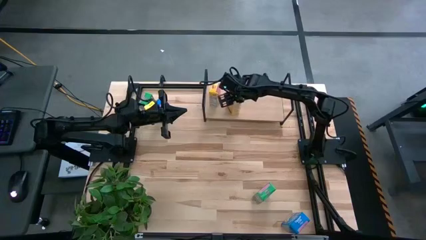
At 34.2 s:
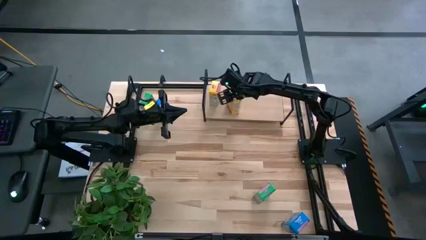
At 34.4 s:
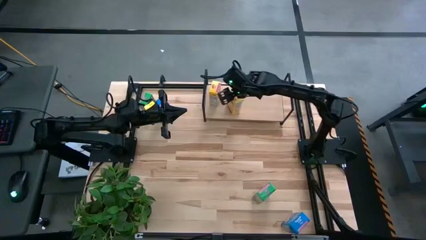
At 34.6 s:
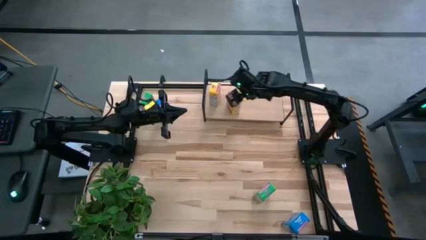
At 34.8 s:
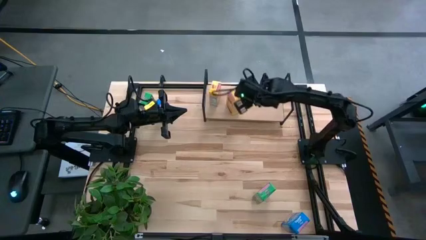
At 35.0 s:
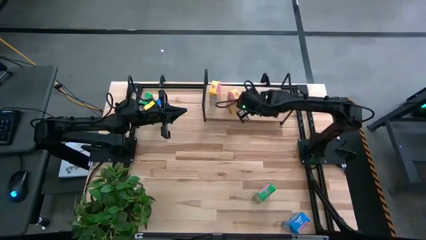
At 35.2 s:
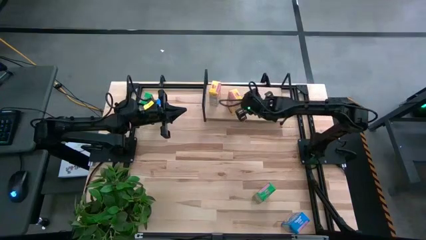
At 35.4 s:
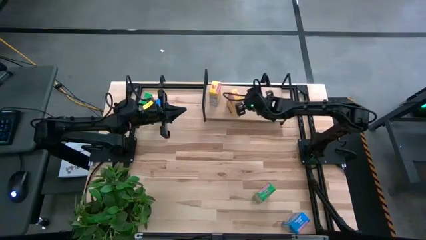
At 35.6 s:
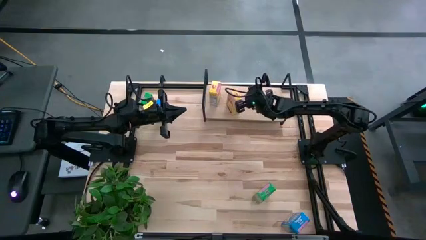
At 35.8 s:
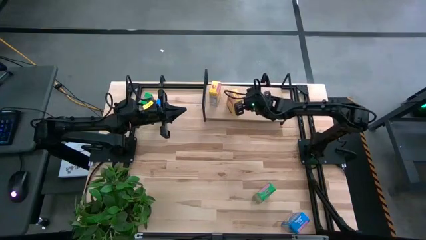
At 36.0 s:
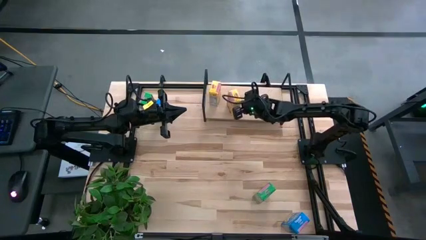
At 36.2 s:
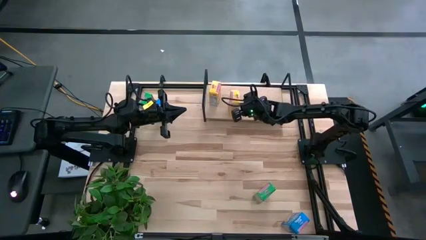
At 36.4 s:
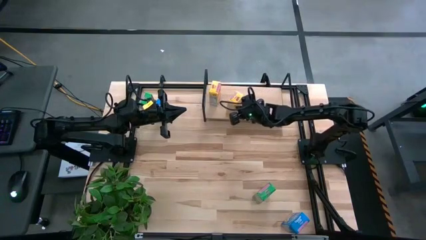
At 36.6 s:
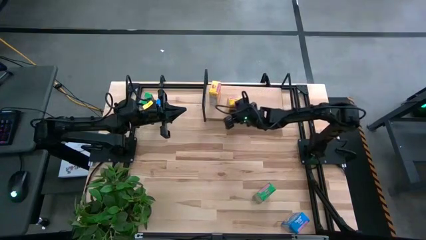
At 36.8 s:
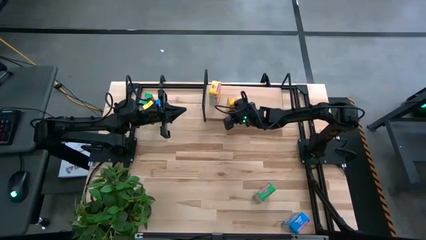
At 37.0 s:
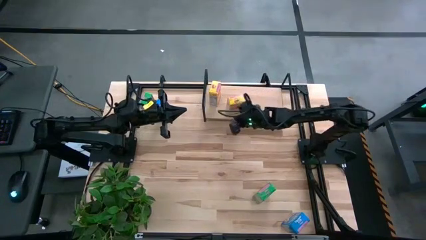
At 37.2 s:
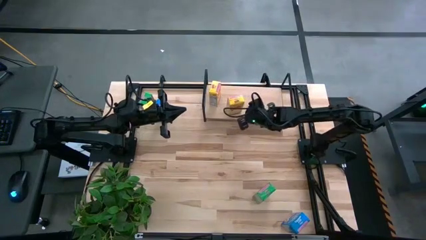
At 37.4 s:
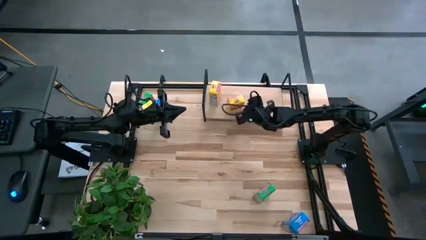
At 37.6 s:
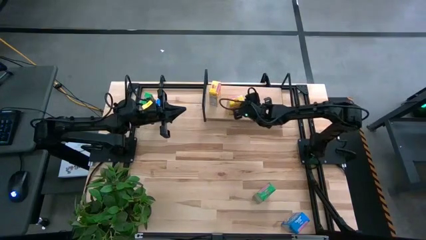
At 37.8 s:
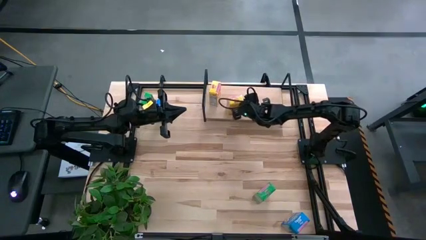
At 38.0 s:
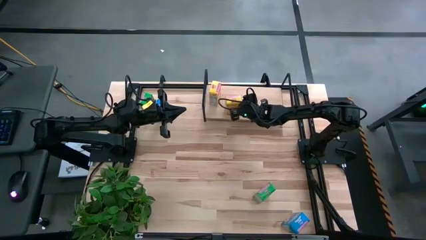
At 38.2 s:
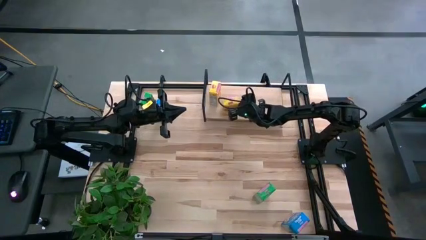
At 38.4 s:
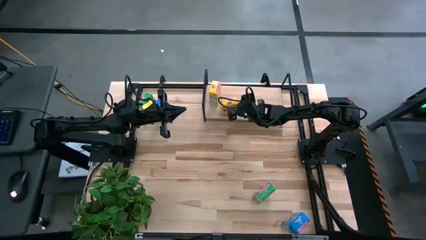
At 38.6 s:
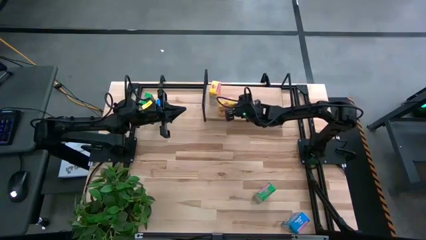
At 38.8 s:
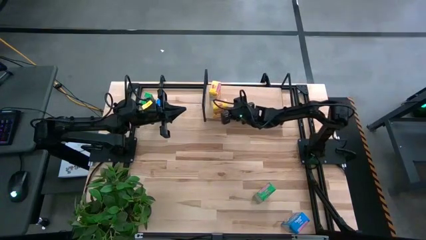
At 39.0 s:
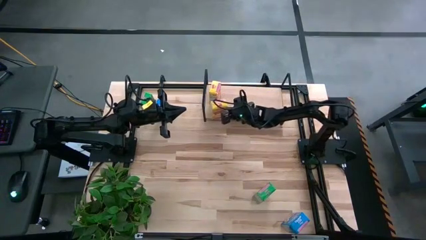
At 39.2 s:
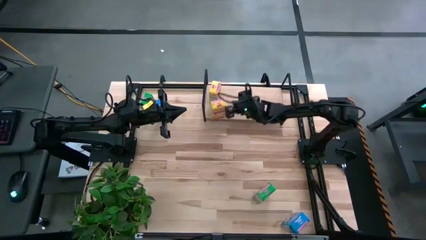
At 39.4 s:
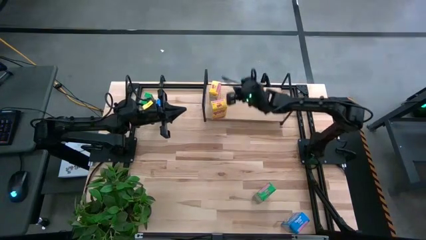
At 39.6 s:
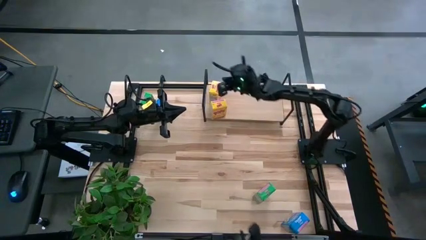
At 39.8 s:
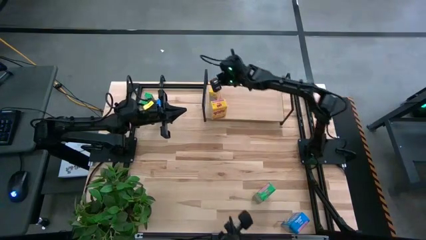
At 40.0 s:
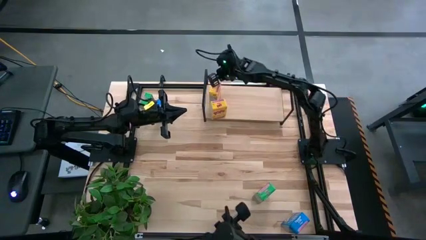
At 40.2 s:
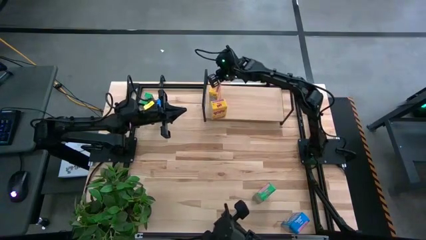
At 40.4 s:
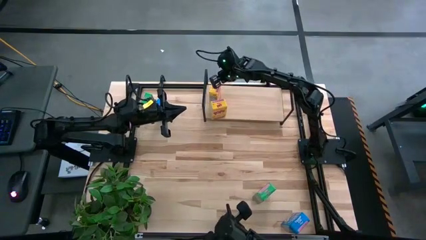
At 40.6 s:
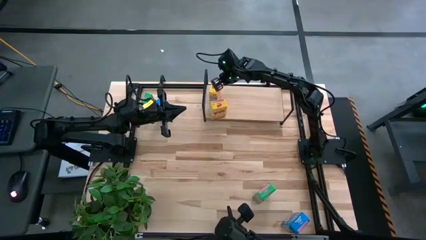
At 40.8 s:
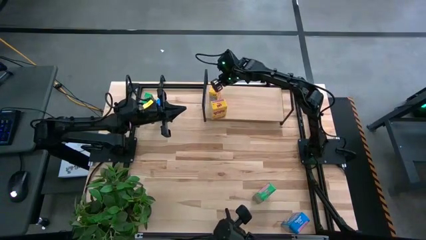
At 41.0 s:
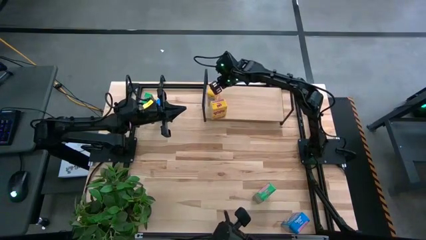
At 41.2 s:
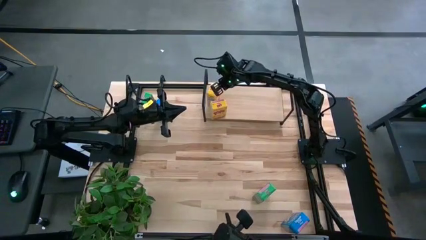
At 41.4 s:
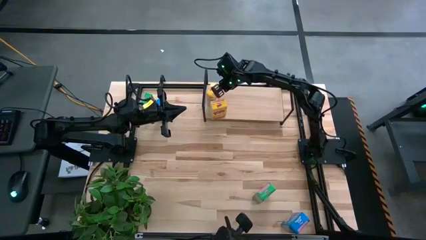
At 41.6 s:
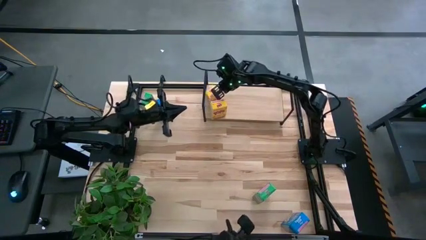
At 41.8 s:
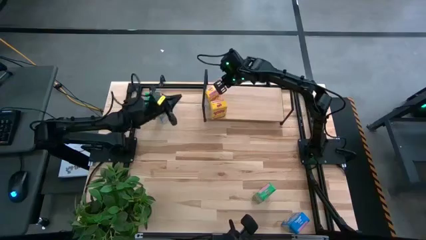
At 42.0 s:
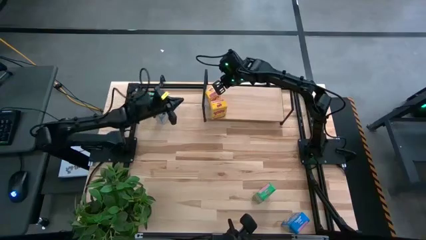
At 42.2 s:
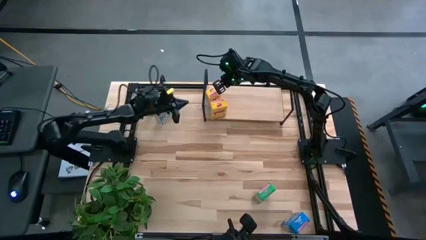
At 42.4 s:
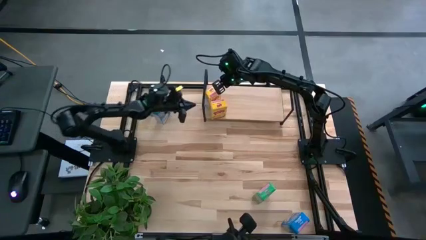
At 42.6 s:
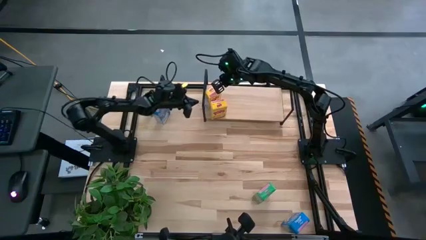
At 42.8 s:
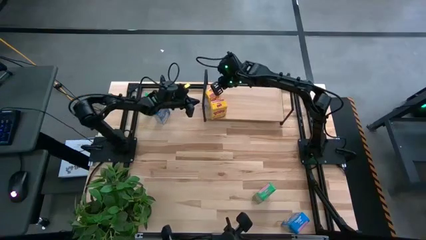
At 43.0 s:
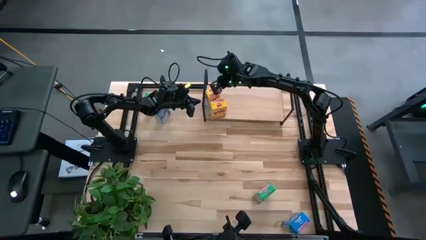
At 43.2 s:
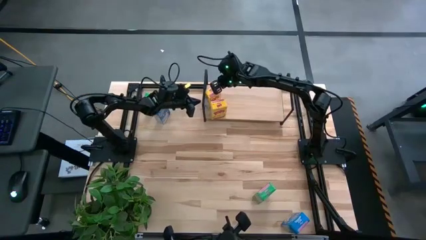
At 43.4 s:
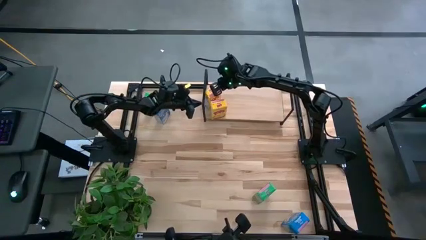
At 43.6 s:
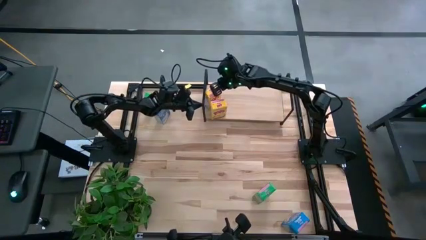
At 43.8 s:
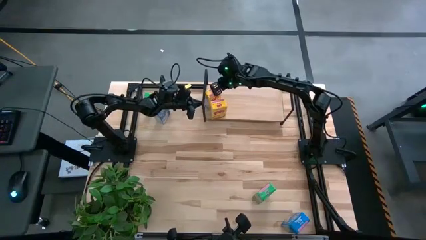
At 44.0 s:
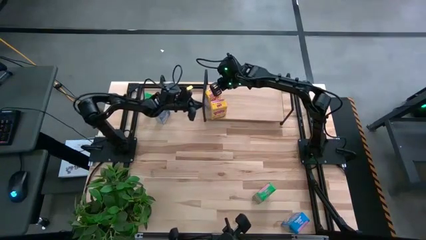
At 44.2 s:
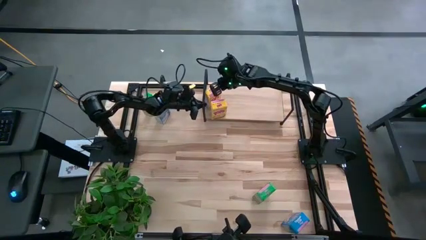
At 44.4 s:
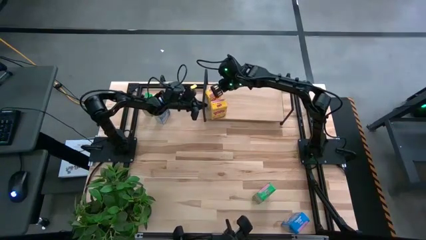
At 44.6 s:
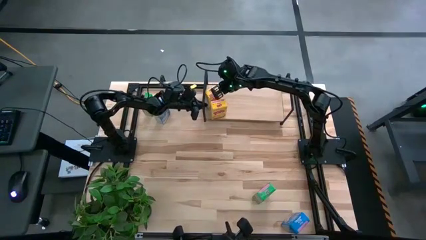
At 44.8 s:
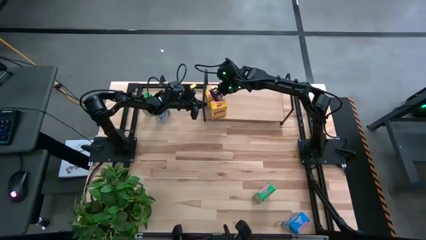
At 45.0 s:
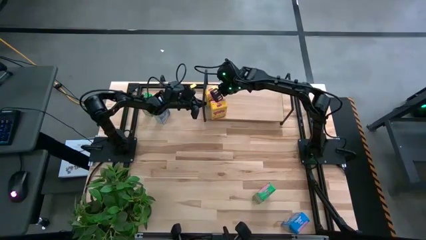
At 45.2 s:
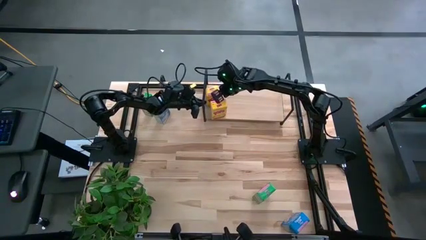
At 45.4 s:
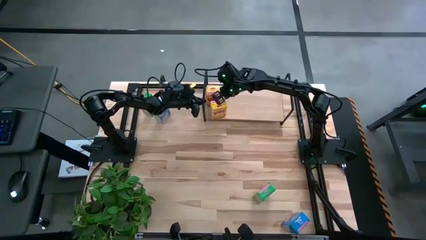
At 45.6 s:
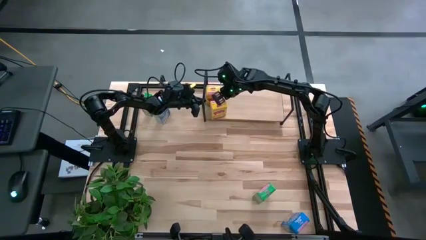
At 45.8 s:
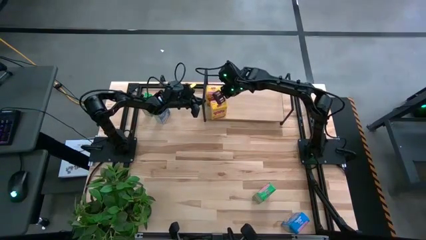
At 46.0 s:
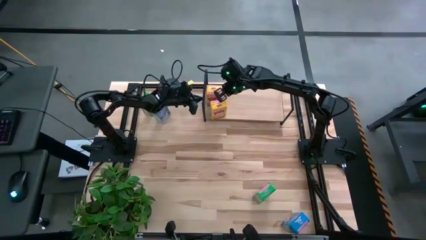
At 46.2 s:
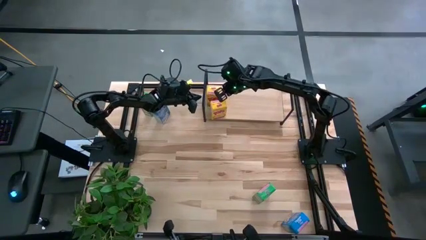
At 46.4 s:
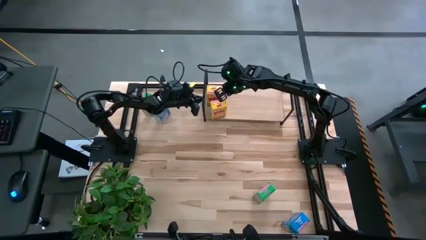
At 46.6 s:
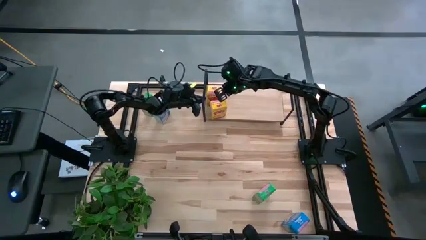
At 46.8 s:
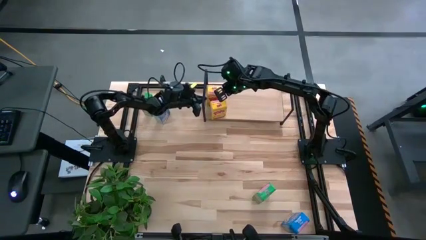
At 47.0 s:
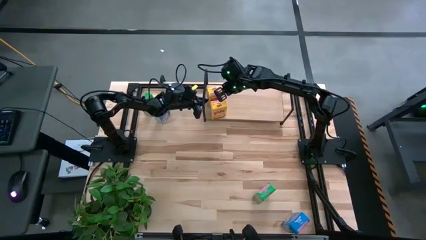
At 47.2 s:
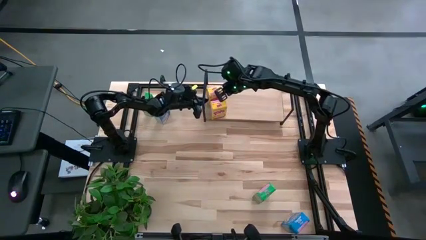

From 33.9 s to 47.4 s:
Task: Stack cereal on shelf
Put the yellow cereal box on the shelf
